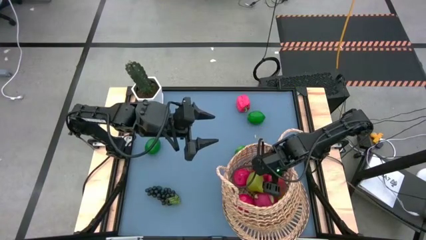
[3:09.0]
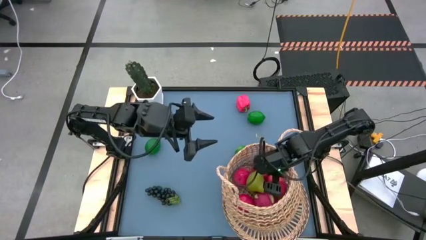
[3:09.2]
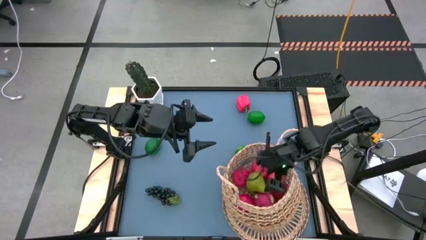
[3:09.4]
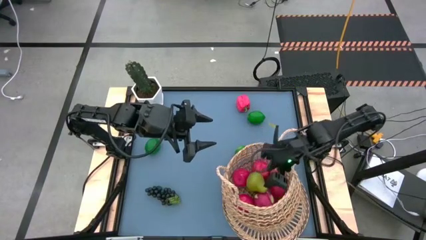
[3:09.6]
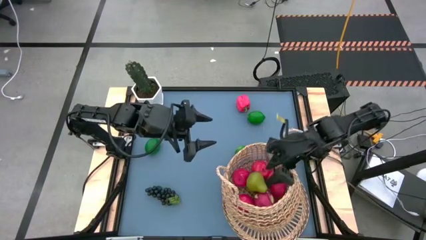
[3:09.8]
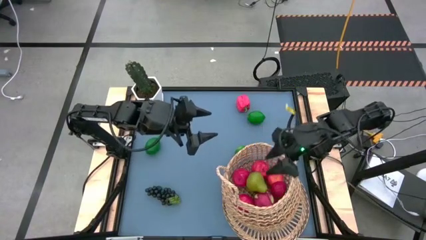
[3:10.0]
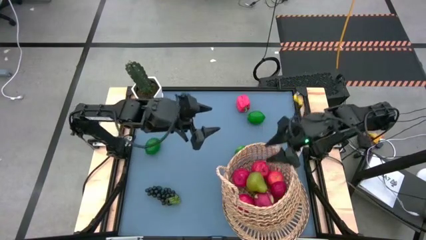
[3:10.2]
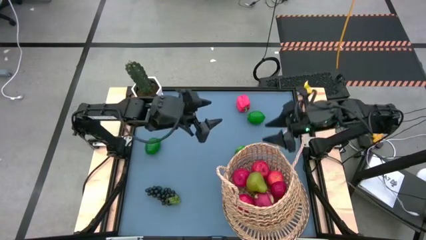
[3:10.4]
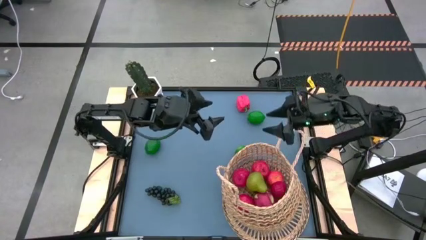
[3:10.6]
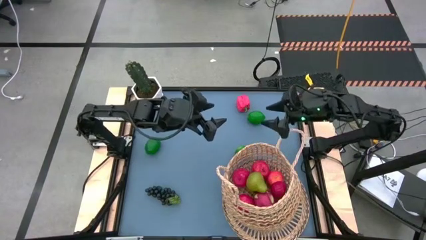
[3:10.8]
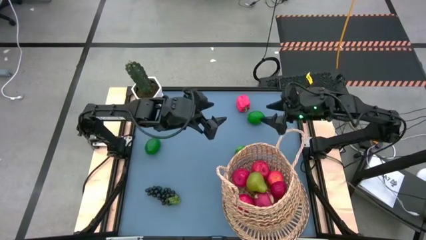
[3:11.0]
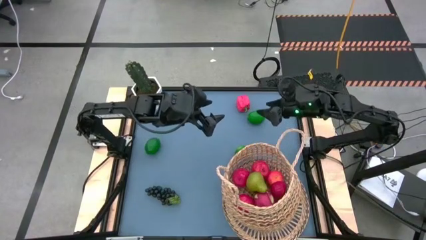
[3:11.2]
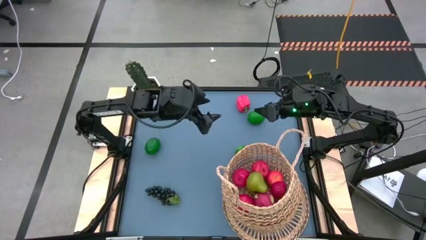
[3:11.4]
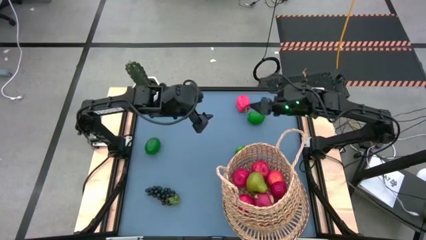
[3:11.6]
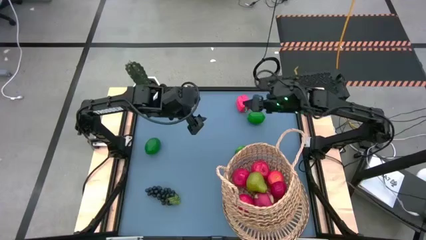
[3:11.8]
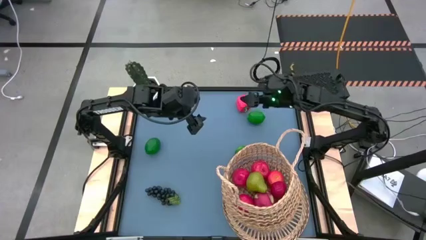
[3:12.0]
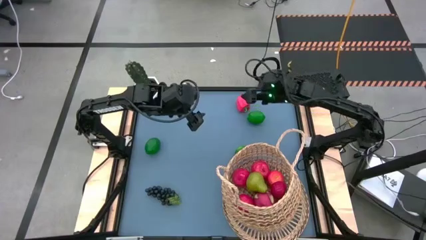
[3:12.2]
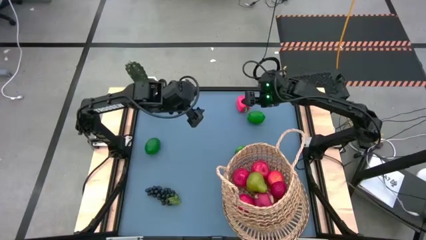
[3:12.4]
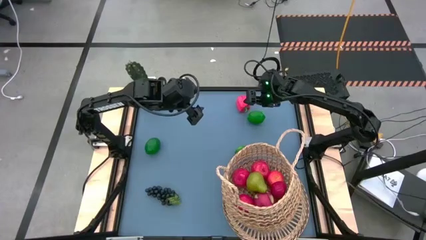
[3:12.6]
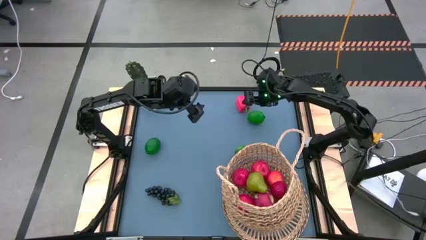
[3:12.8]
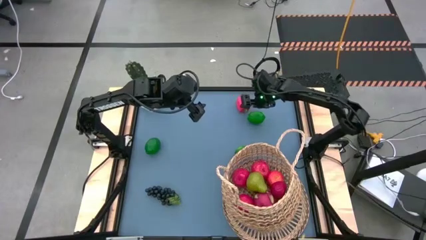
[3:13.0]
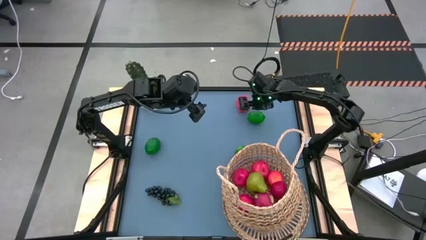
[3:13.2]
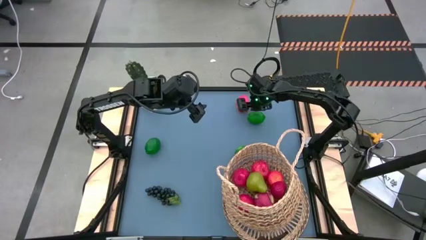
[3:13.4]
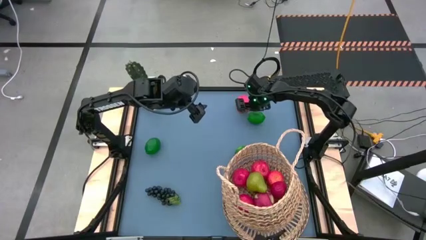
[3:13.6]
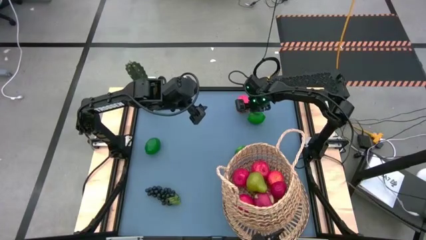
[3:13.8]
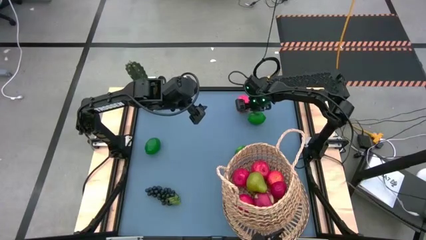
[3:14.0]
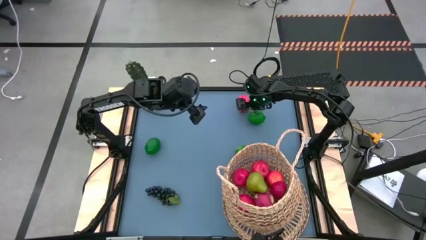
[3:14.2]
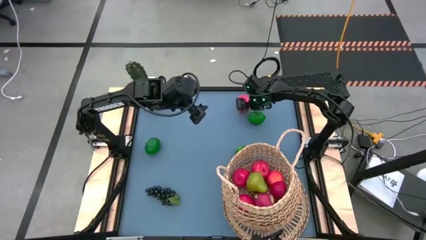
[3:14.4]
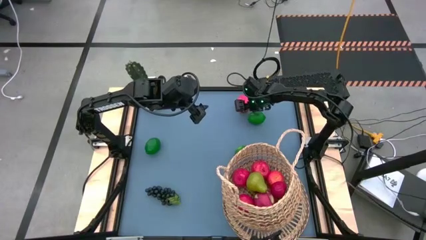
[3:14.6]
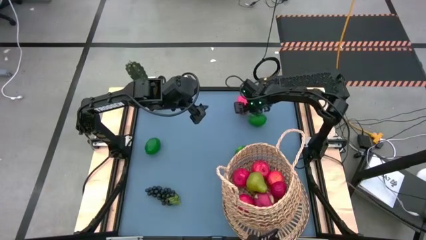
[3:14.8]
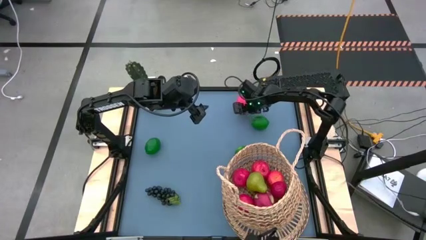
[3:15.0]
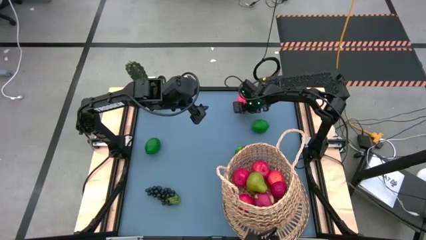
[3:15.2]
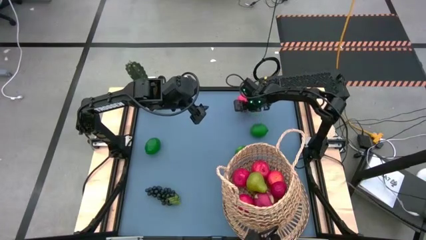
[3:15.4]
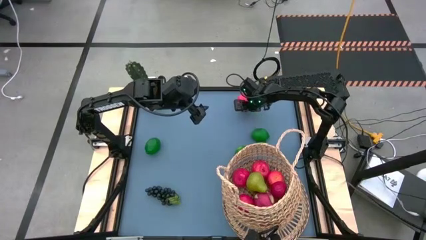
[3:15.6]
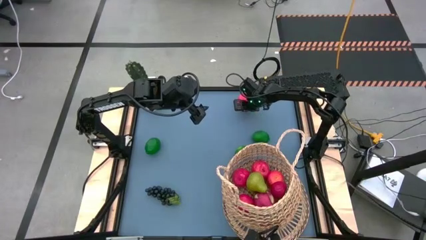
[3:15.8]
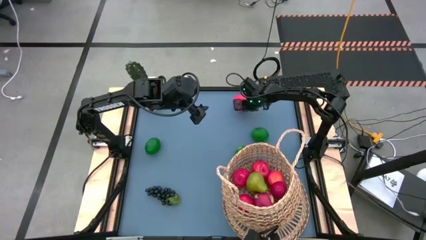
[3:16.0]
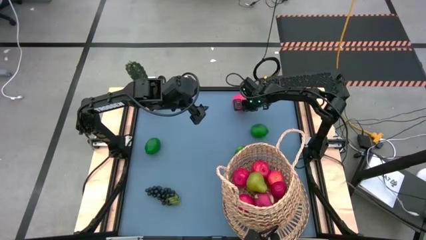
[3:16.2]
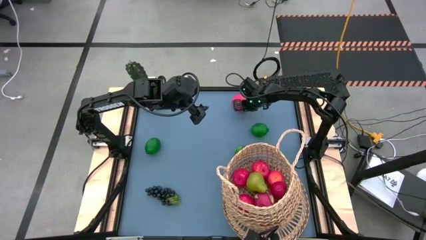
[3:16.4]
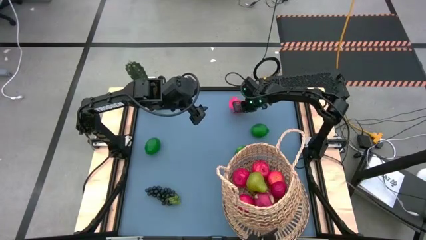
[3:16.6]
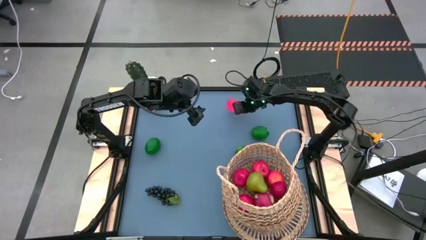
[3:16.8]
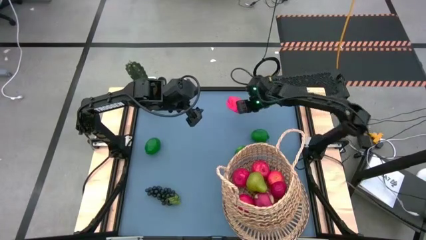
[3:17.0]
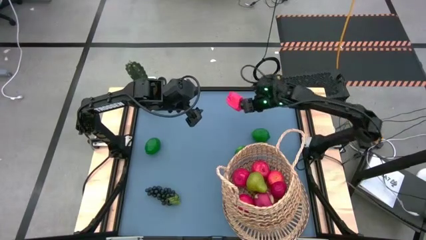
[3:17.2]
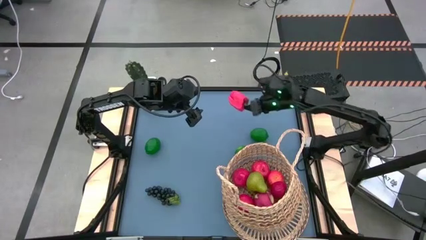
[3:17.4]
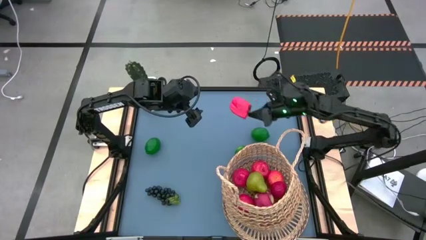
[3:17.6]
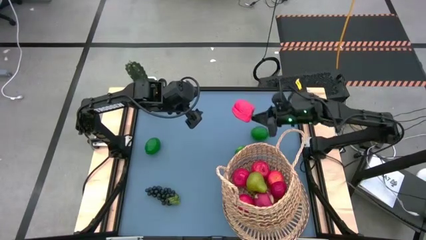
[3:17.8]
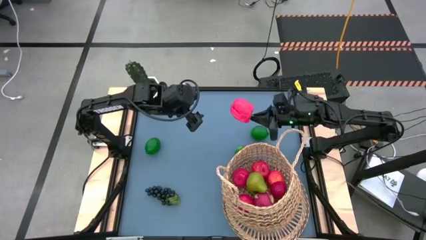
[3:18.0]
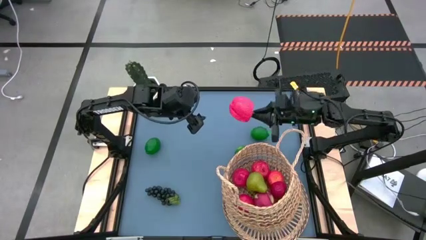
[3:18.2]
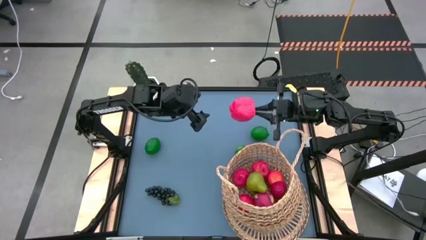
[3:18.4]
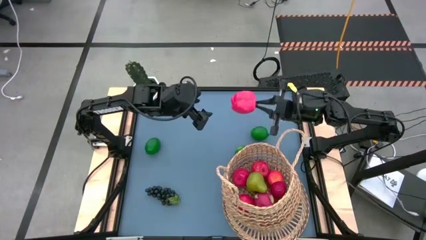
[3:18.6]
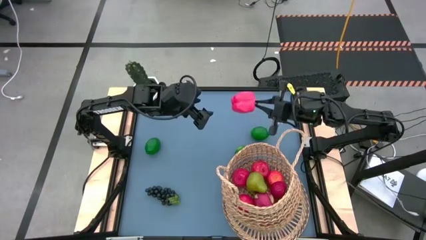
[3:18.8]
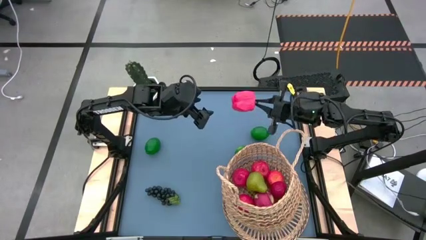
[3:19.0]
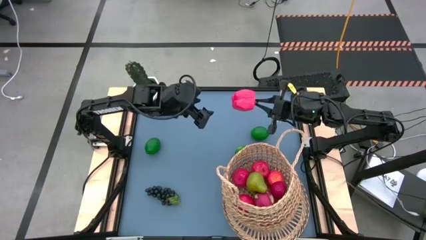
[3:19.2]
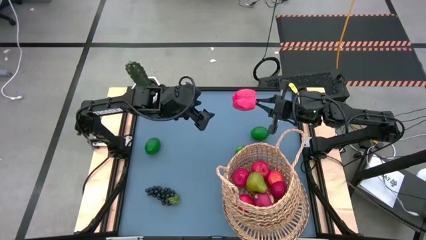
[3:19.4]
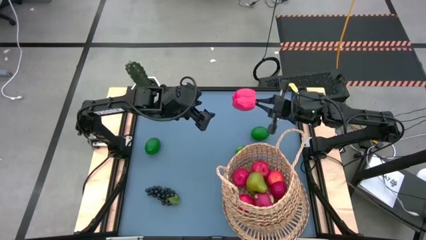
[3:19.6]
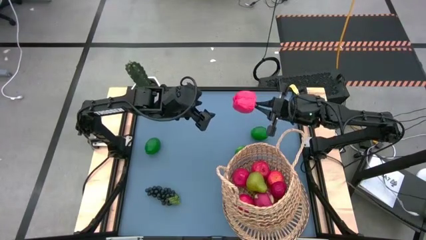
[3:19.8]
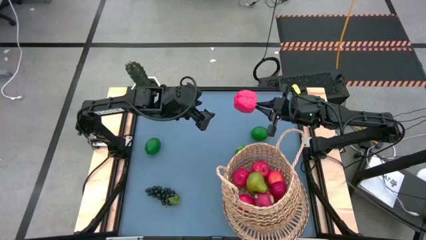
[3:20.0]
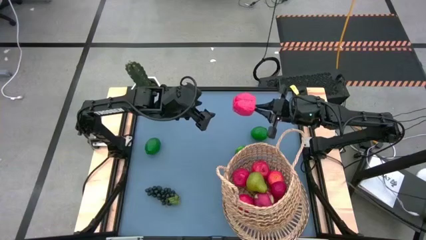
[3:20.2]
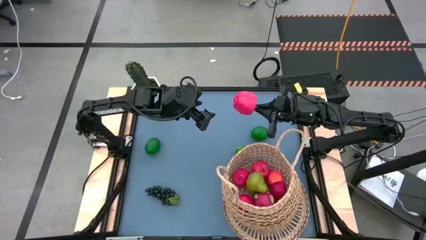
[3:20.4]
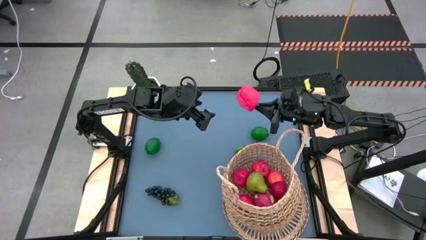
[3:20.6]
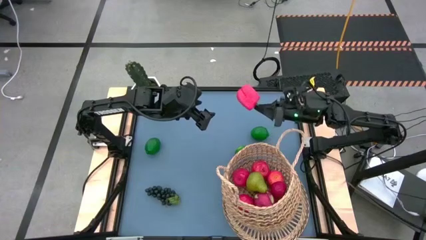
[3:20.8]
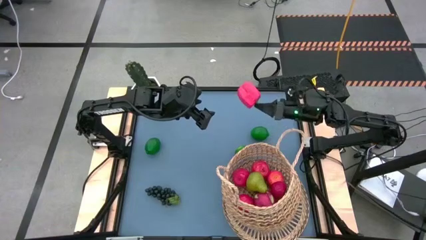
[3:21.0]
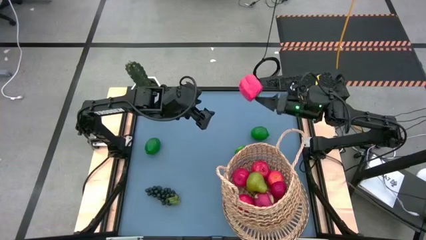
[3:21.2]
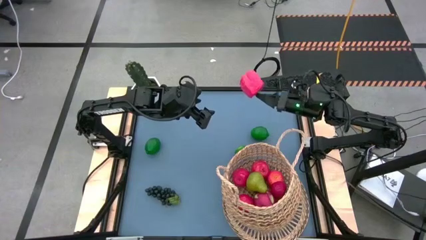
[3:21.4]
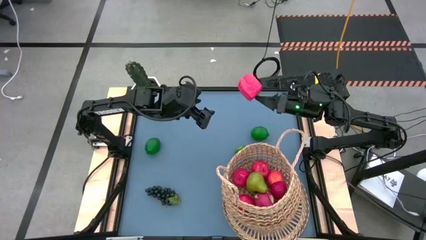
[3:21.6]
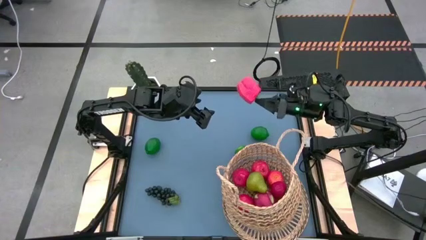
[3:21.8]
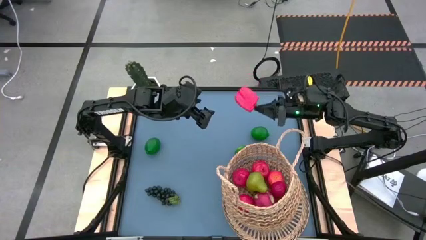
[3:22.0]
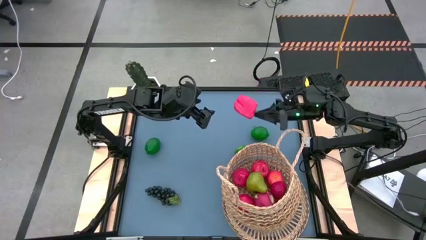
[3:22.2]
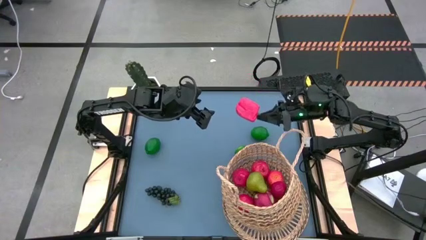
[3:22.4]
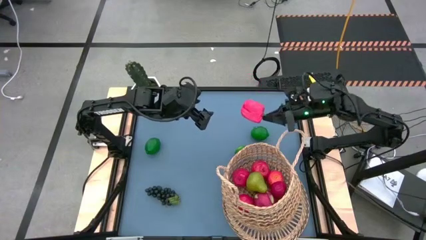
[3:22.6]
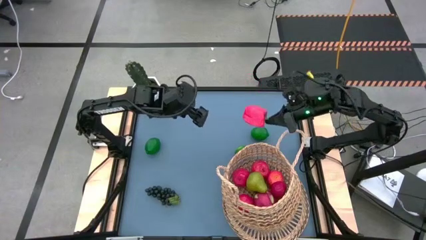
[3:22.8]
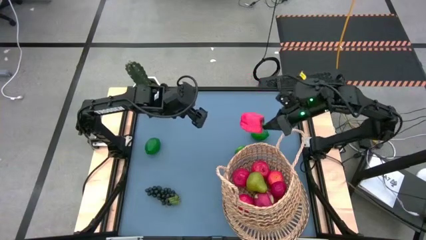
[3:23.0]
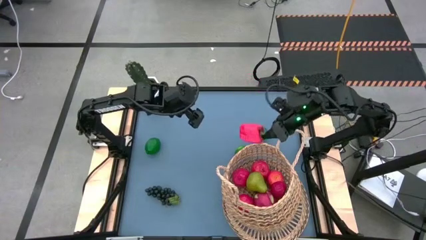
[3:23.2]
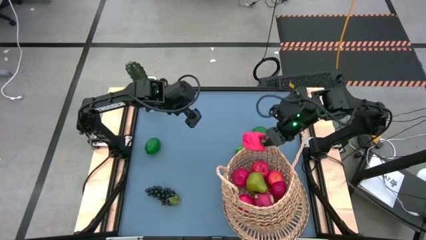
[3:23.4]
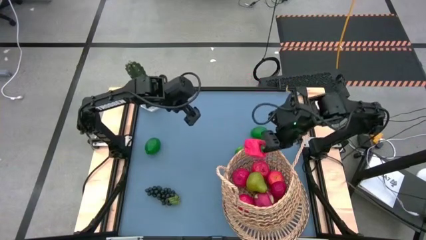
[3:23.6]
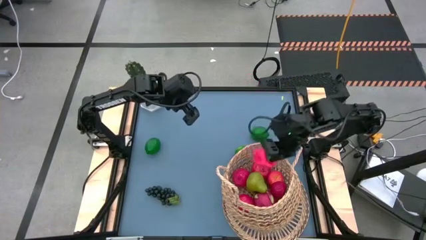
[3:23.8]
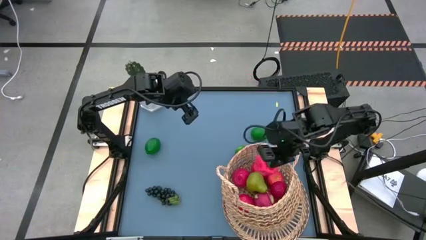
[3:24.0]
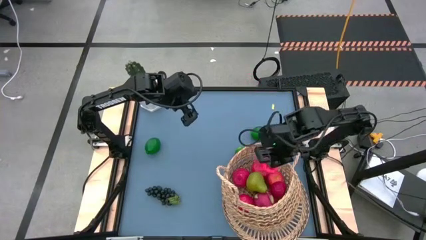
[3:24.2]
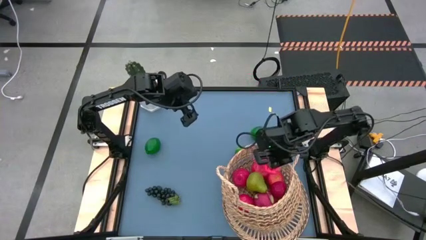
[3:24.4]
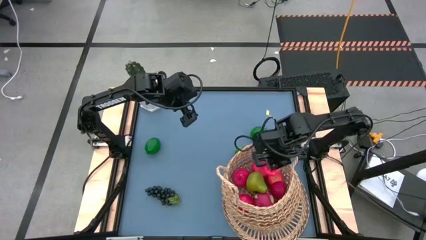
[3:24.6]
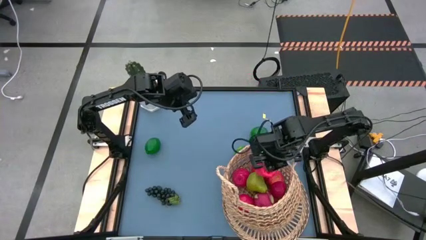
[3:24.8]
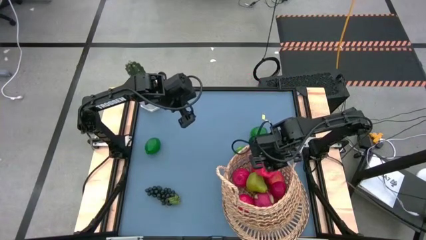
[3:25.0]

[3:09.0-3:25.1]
Task: Build produce basket
Put the bell pepper into the brown basket

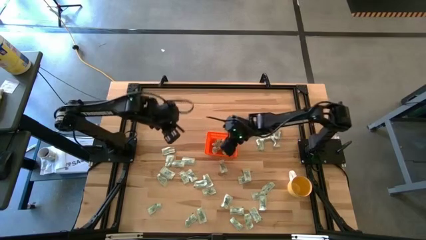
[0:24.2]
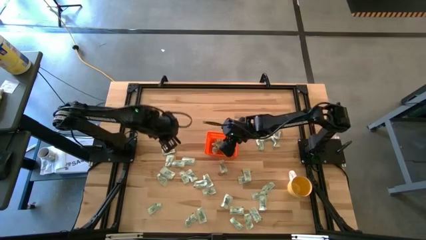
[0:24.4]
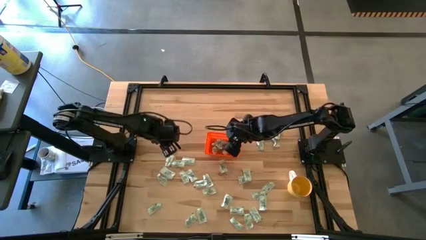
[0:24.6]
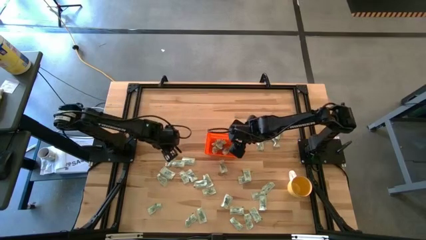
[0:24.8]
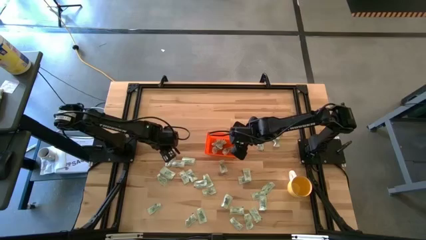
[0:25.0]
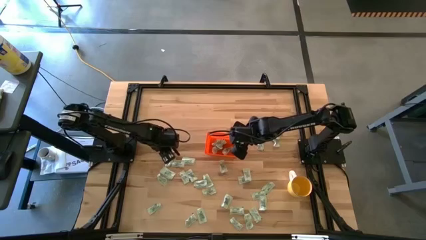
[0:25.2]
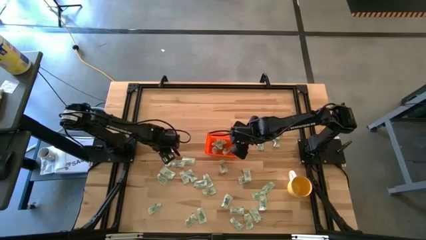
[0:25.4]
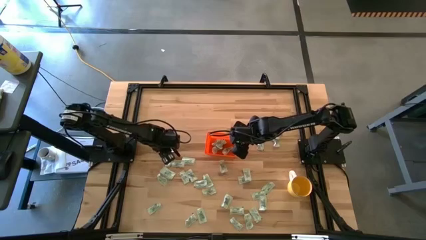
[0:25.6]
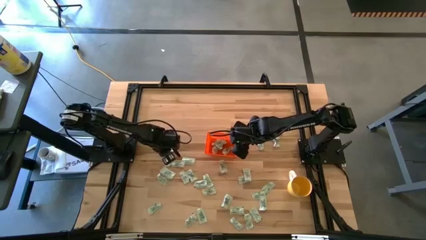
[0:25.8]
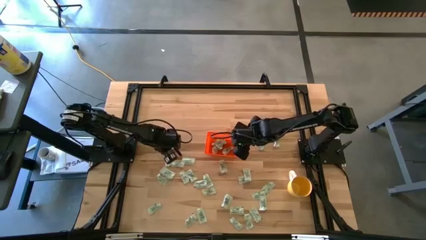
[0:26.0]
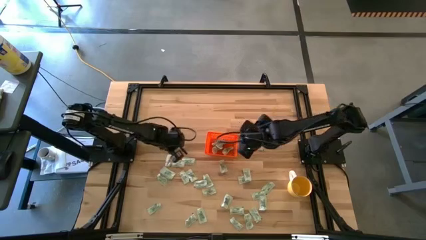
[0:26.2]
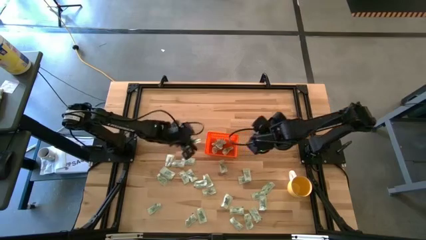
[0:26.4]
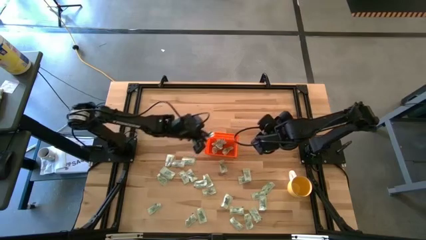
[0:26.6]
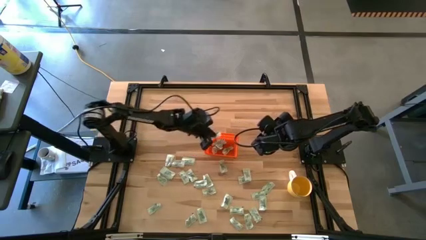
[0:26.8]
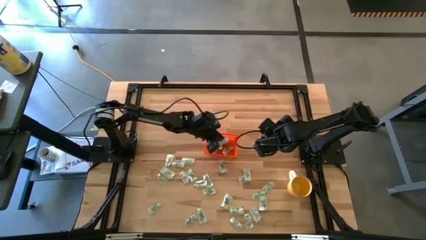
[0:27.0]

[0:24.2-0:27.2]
Task: Pick and place Stevia / Truvia into bins
Put the light green stevia packet into the orange bin
